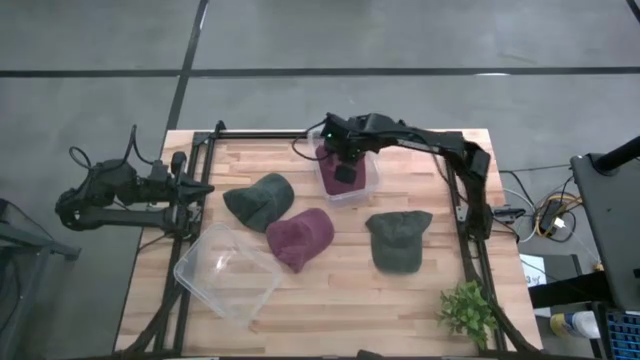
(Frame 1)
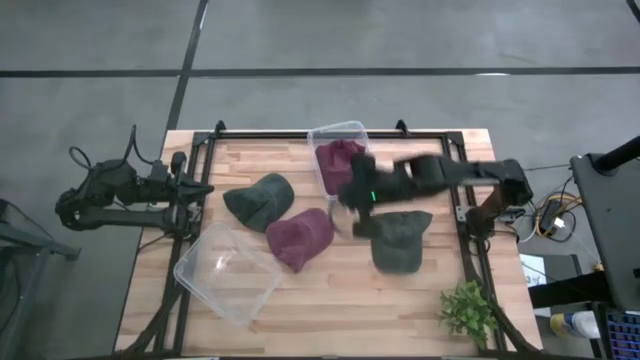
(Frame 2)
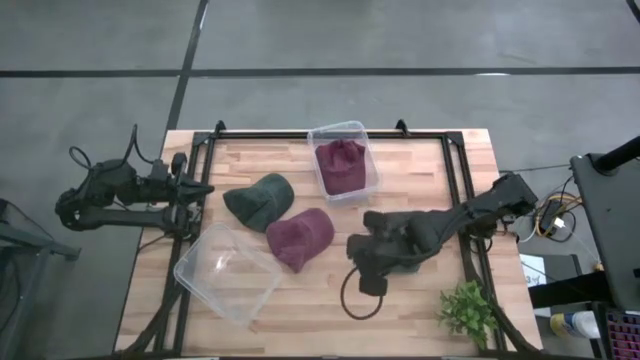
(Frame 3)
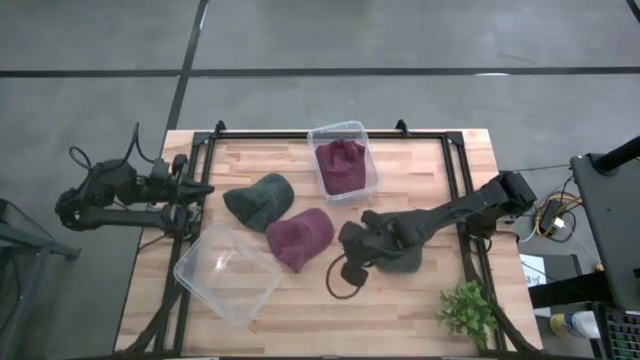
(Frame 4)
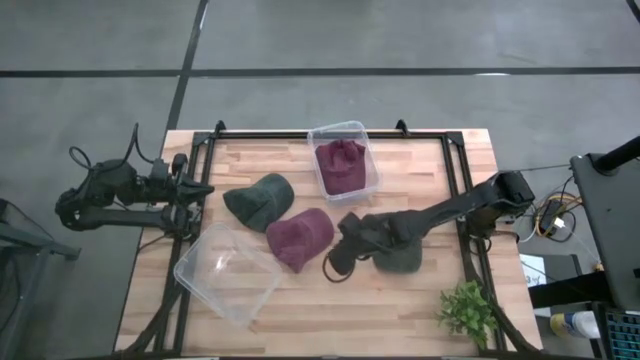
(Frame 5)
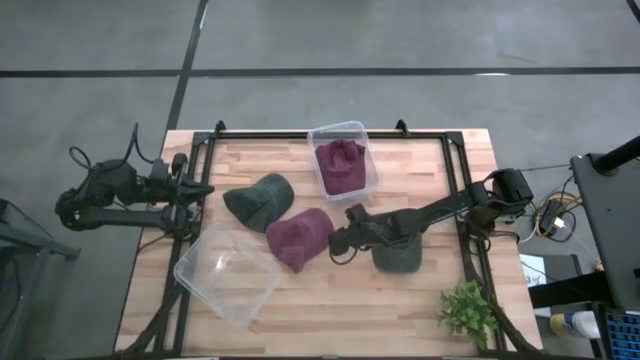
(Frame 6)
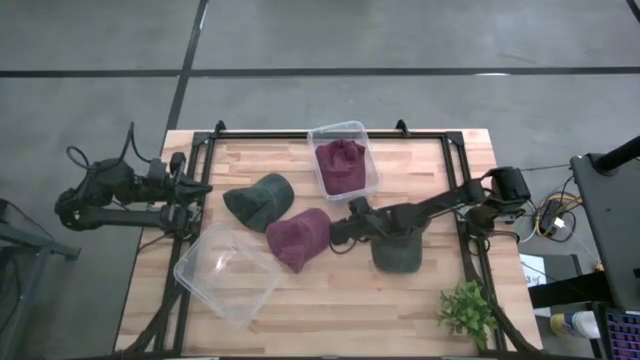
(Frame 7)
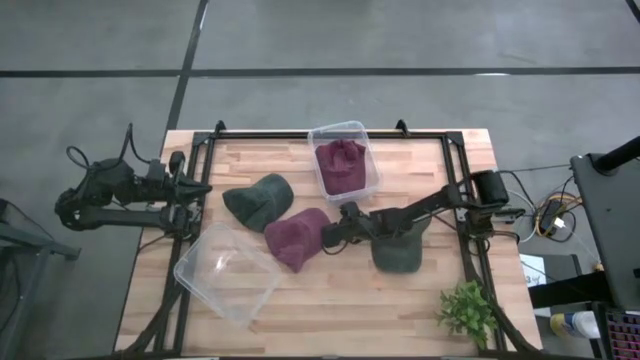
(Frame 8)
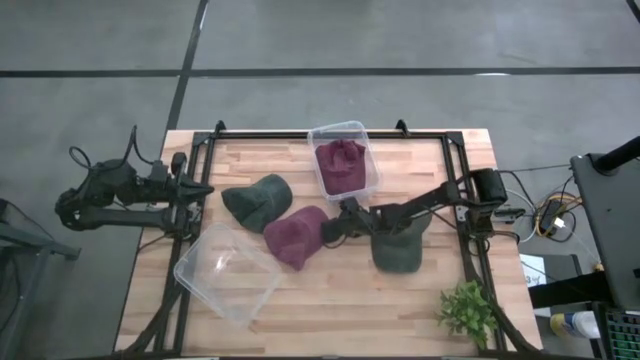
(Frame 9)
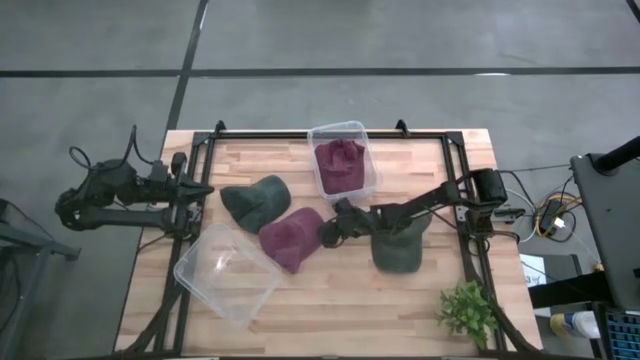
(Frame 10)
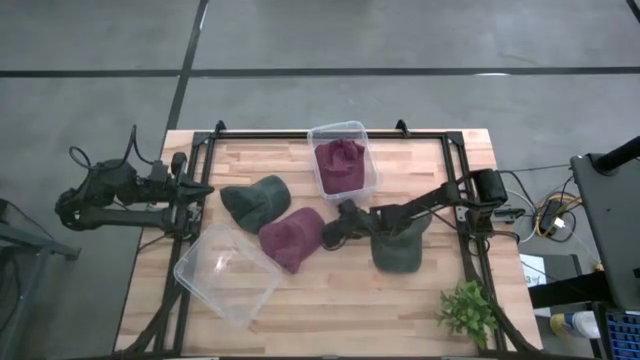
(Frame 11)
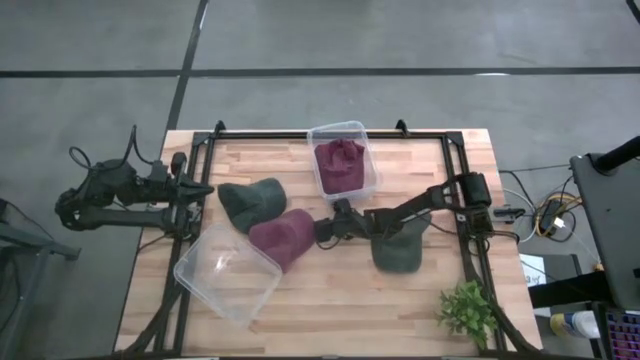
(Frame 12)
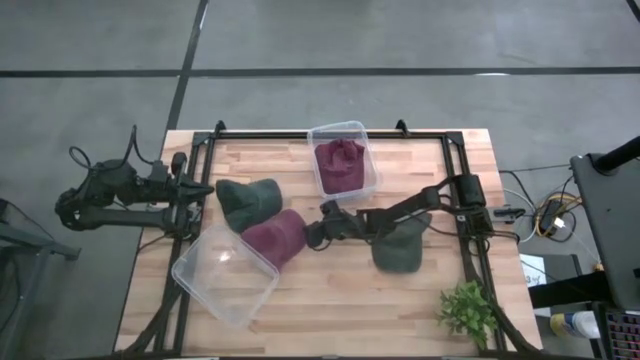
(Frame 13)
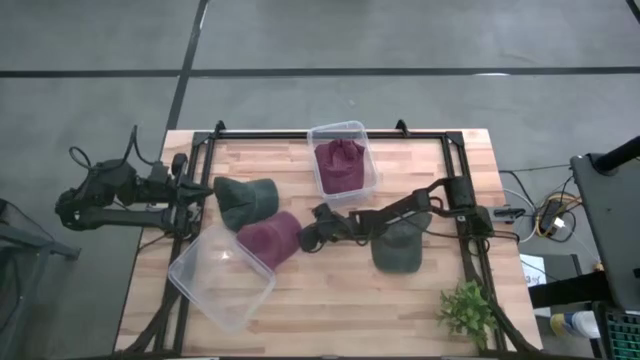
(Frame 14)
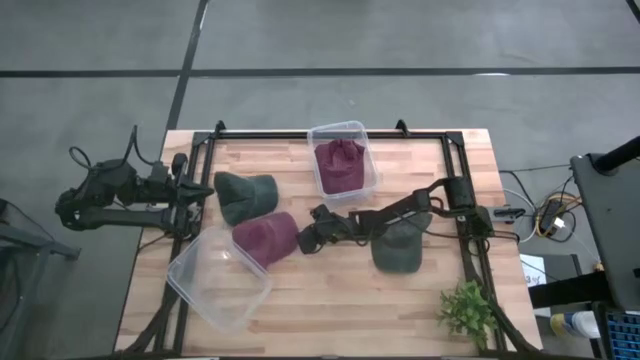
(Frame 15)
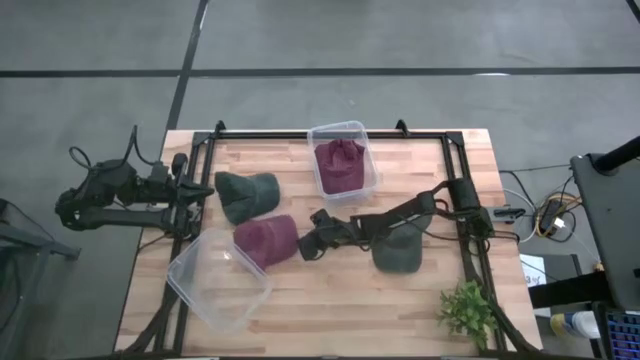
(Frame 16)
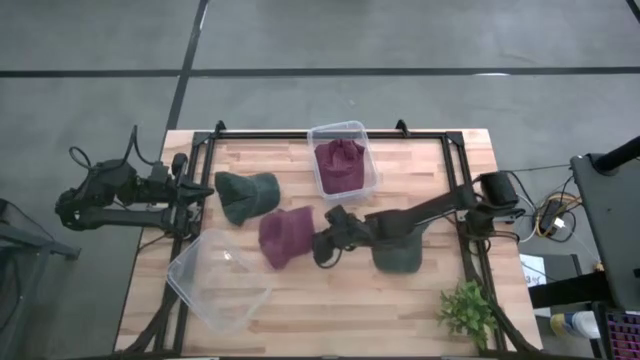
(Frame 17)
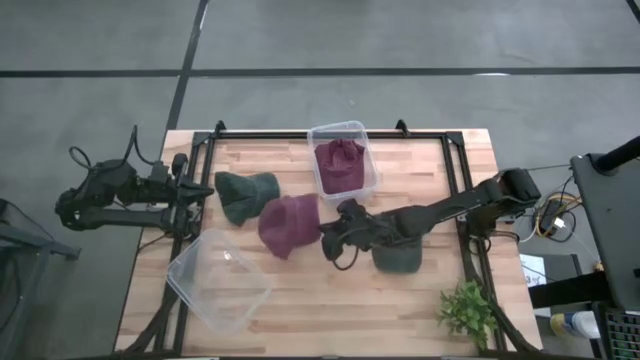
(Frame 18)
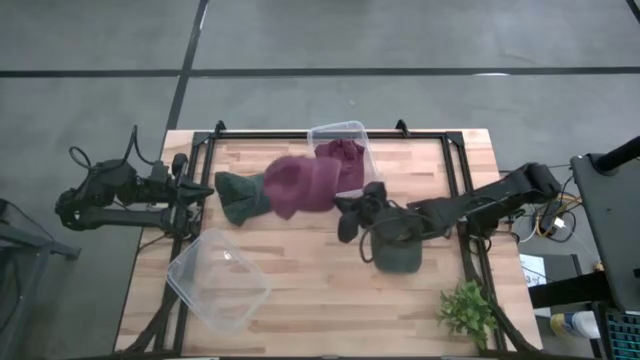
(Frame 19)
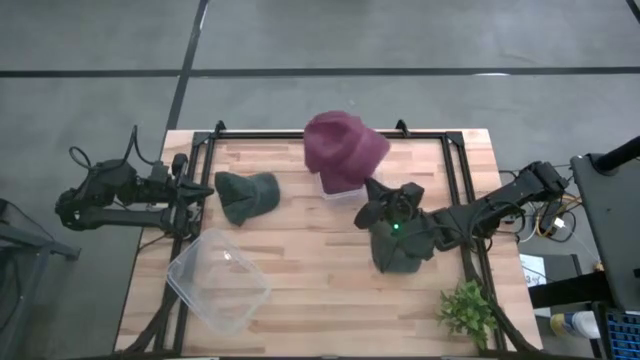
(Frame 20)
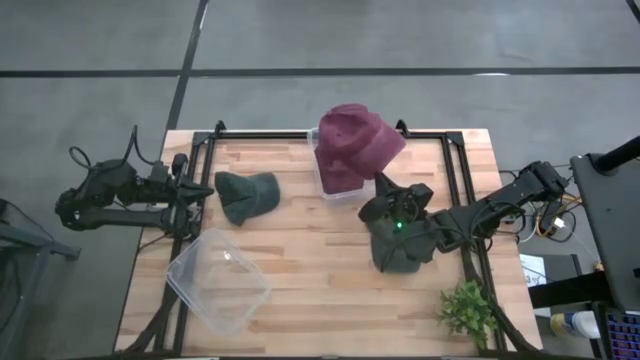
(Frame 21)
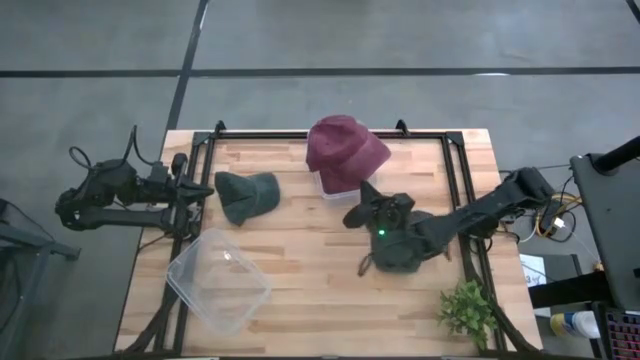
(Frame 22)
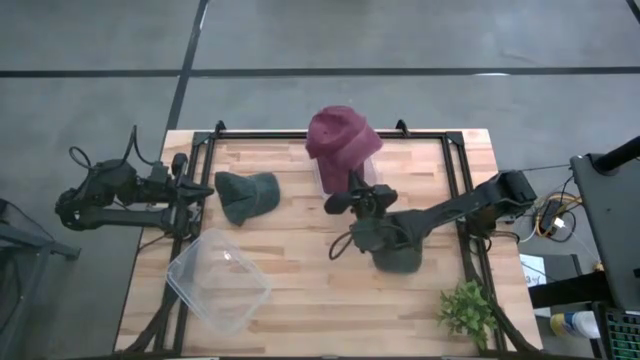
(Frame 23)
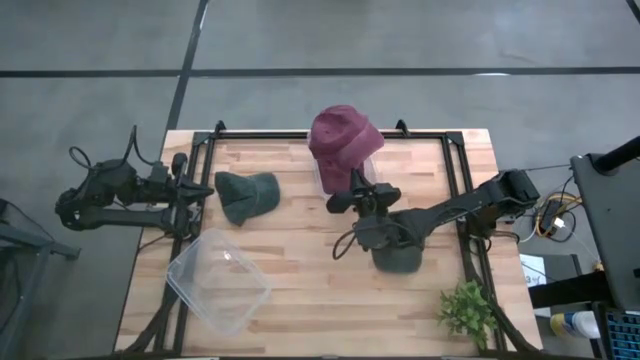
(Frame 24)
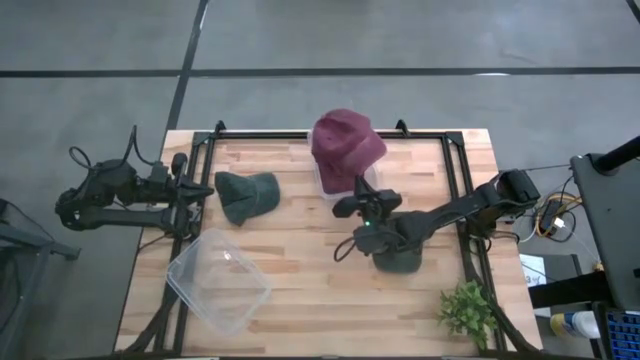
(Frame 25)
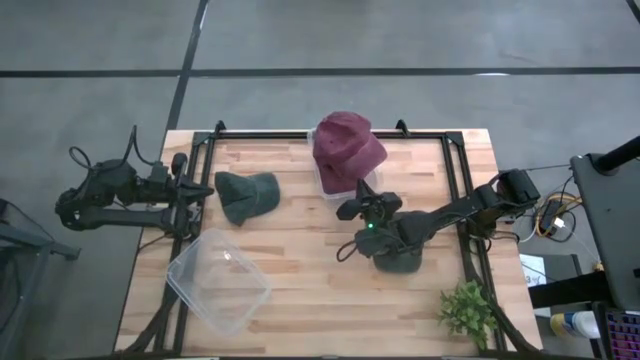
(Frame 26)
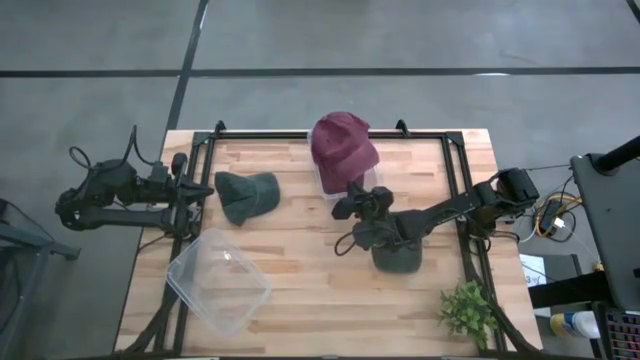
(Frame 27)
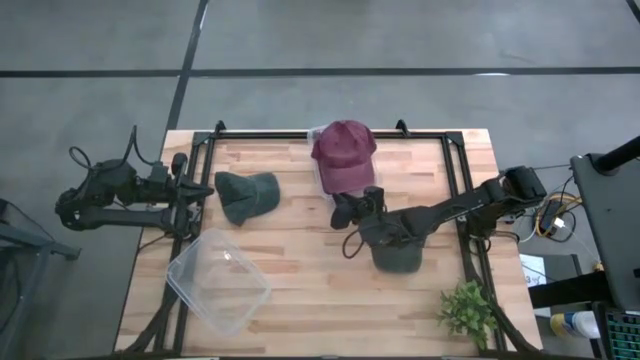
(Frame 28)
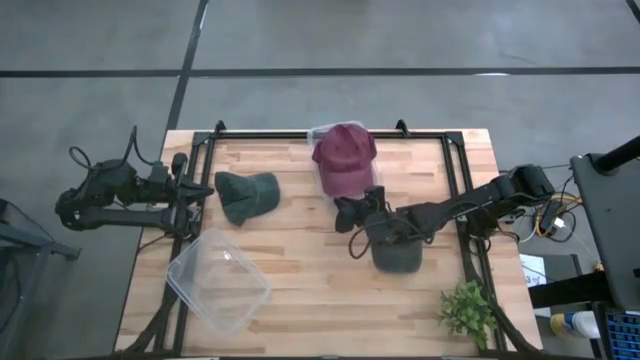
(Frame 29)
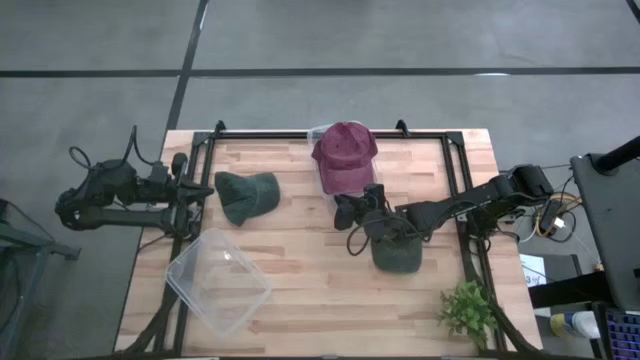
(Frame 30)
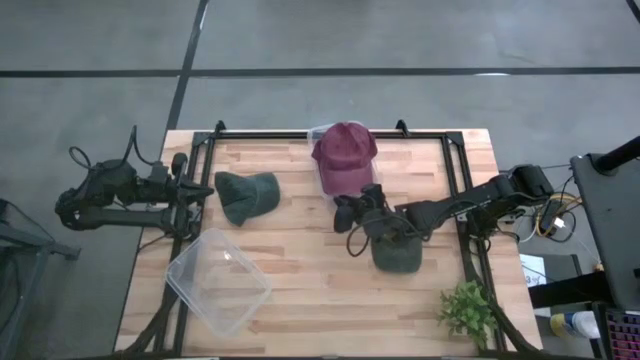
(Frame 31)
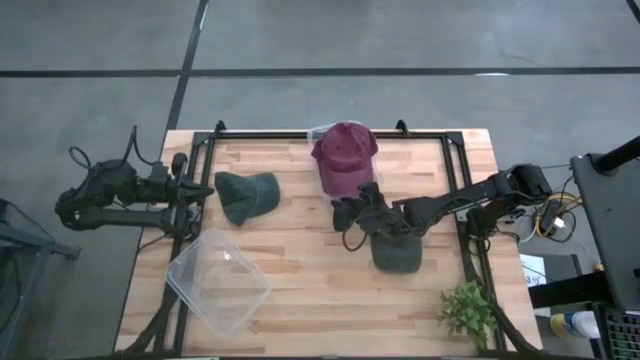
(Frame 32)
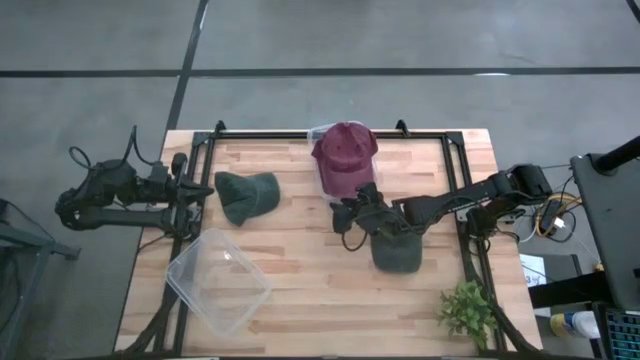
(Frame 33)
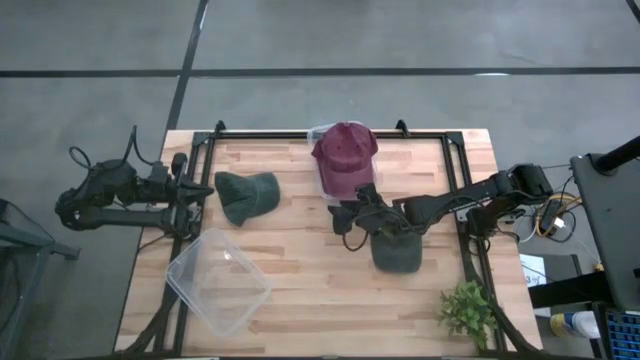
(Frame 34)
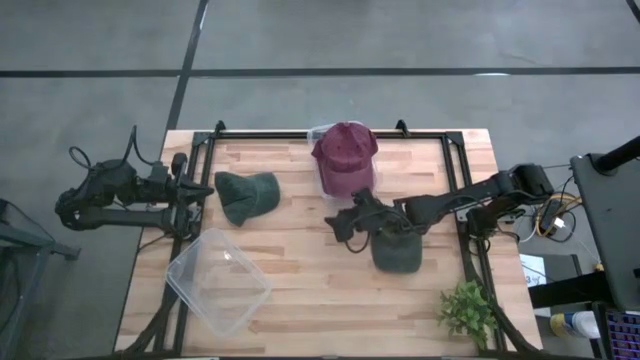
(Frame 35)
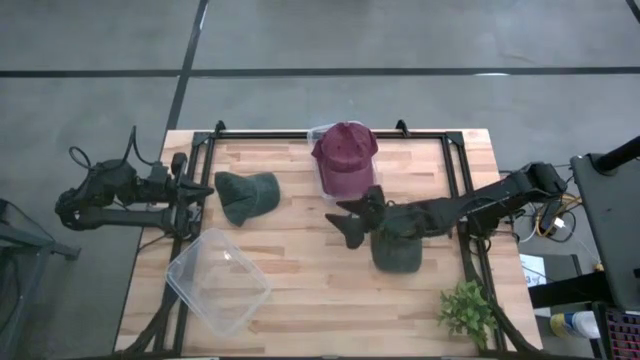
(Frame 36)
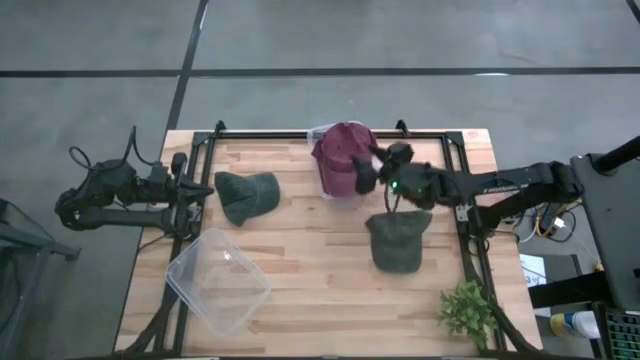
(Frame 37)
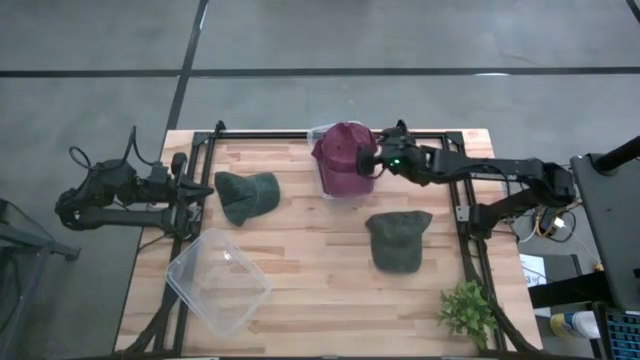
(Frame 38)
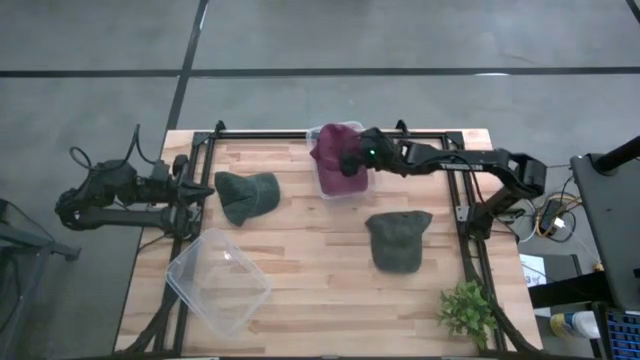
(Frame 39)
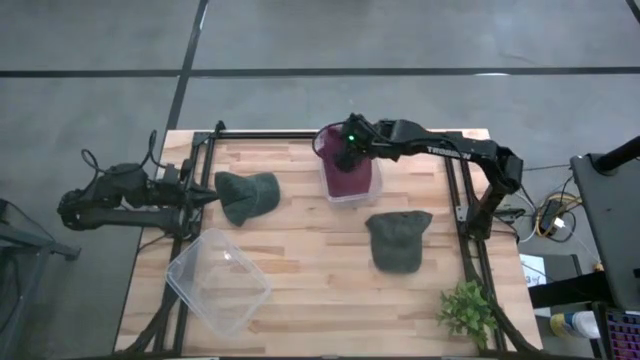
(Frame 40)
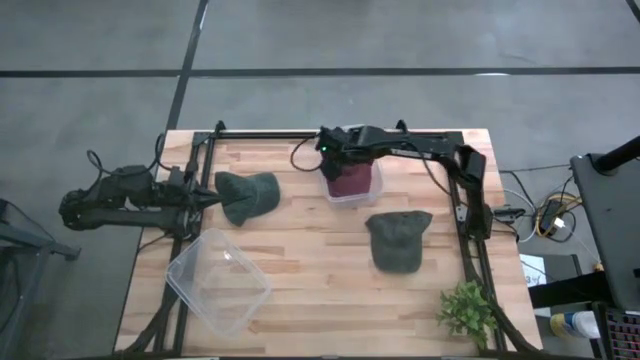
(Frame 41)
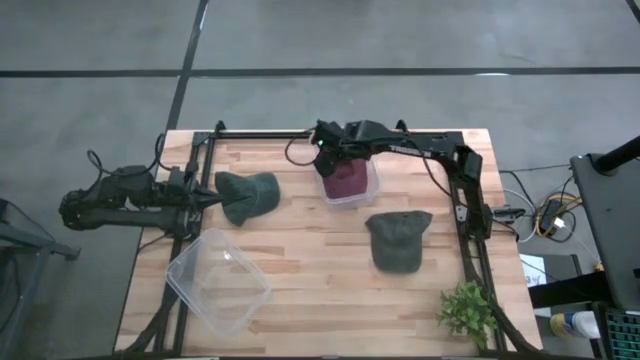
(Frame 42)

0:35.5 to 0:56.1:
Task: Pick & Place hat
Put the dark red cap into the top transparent bin
